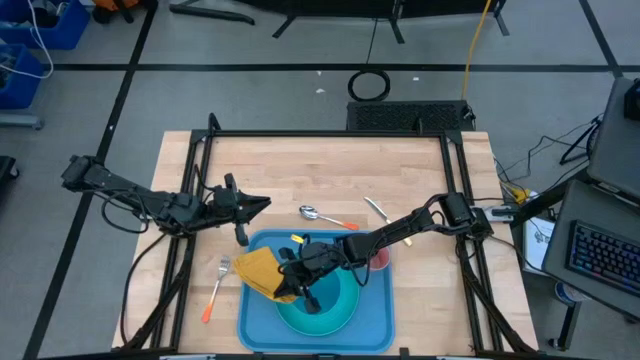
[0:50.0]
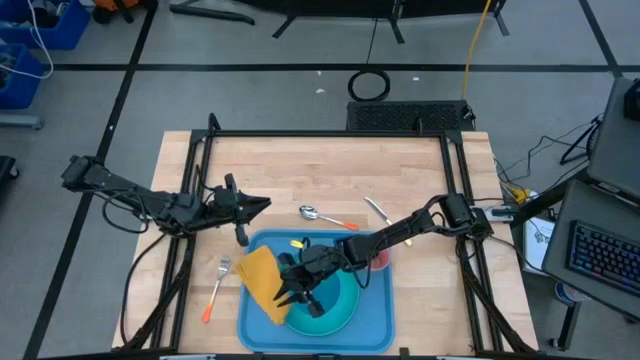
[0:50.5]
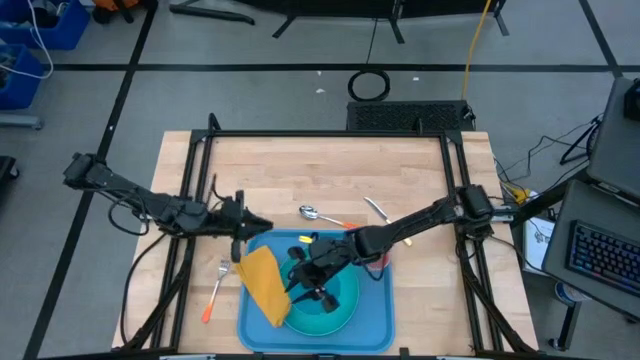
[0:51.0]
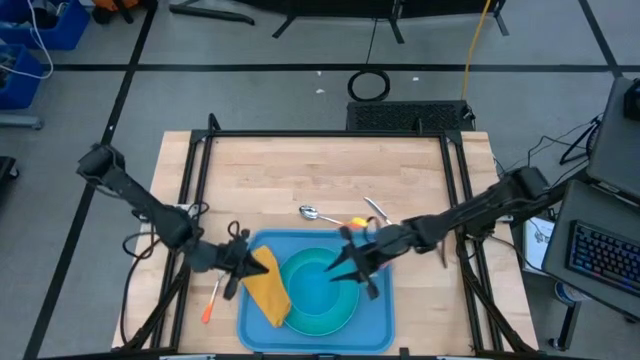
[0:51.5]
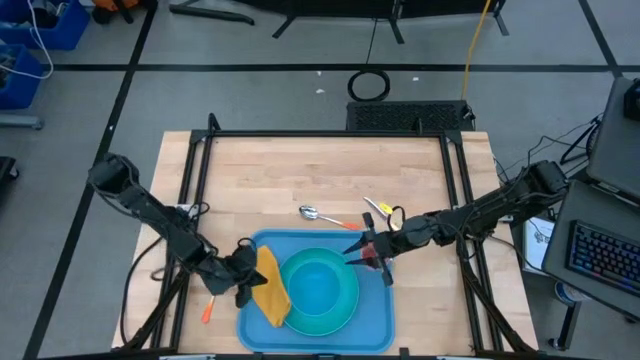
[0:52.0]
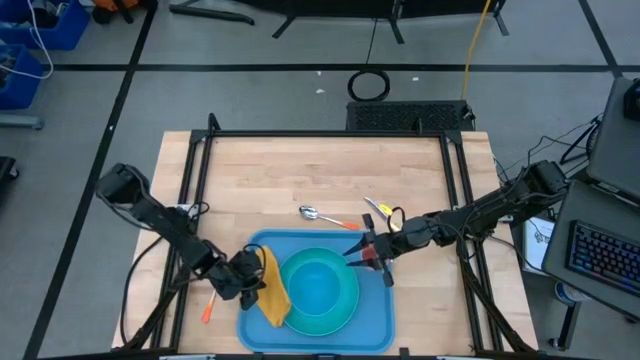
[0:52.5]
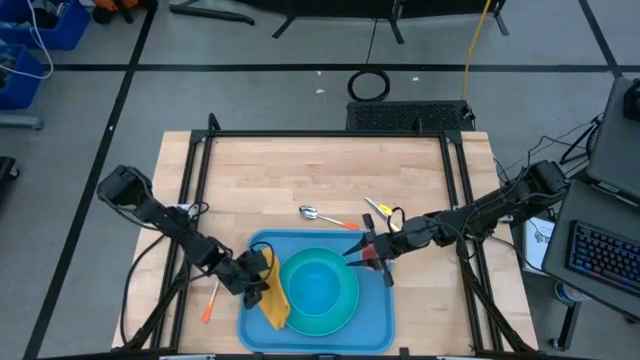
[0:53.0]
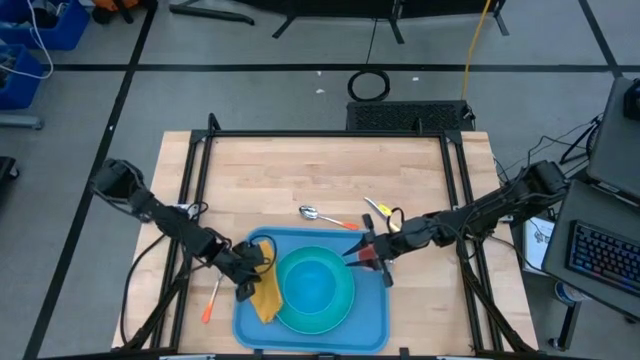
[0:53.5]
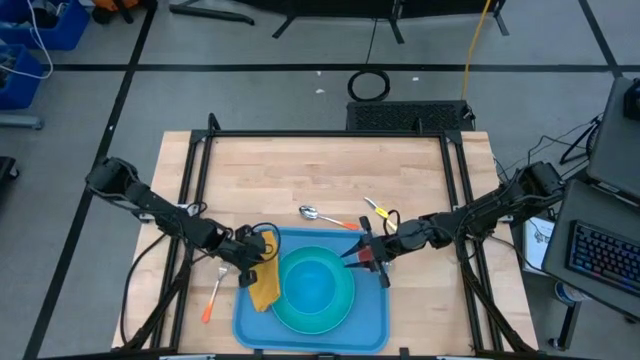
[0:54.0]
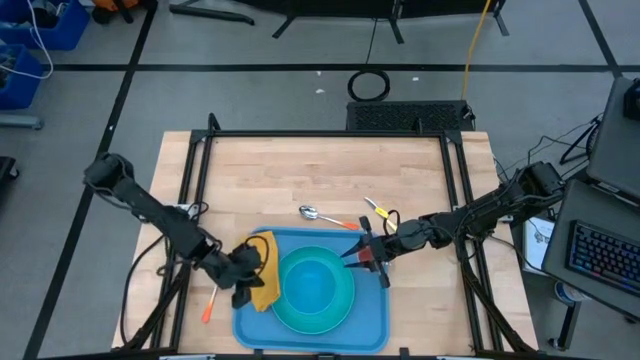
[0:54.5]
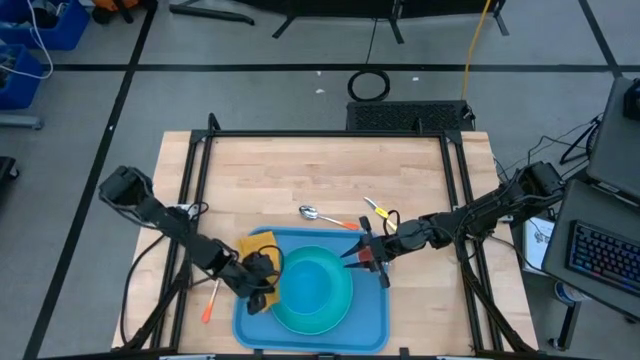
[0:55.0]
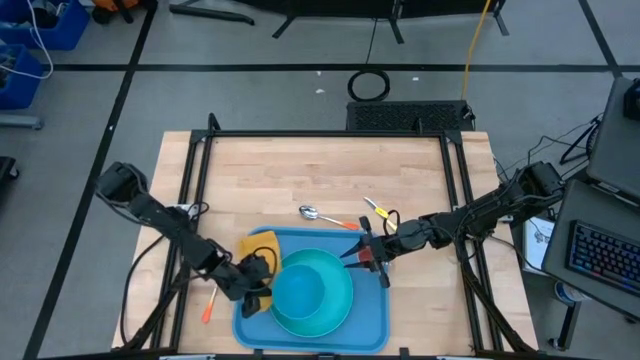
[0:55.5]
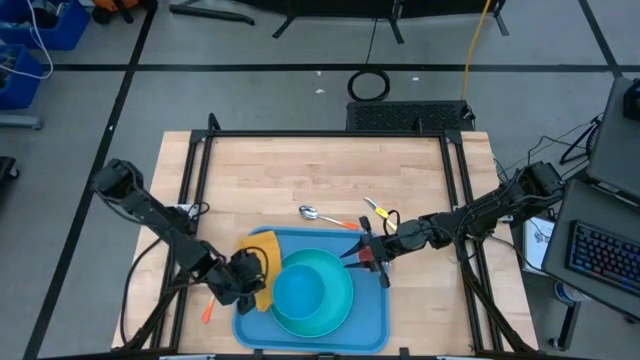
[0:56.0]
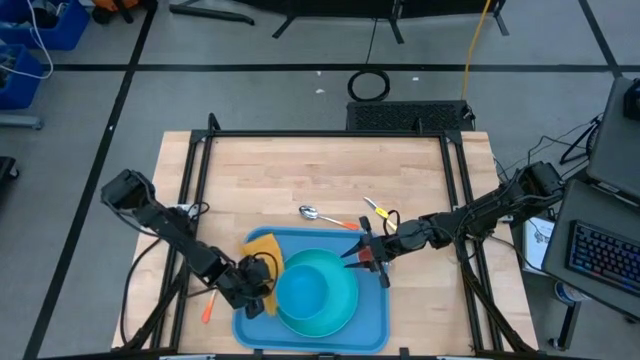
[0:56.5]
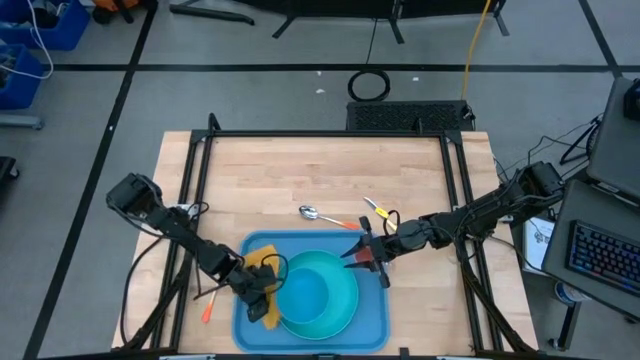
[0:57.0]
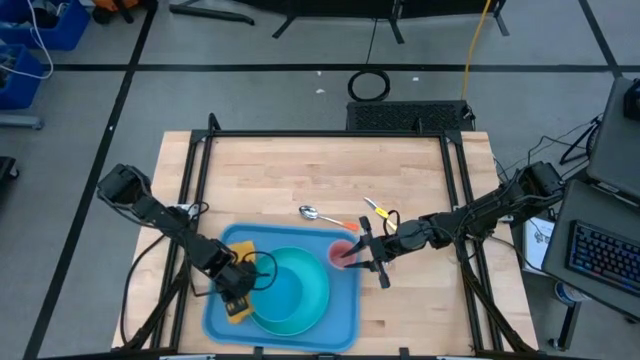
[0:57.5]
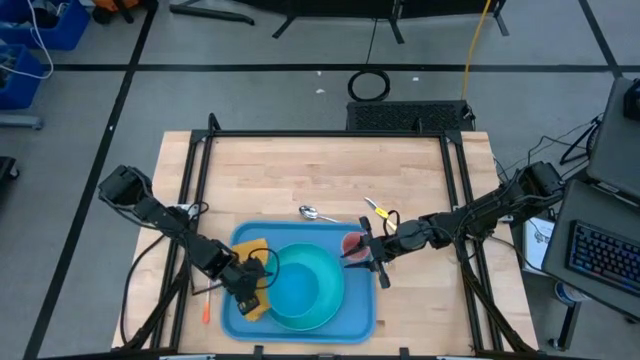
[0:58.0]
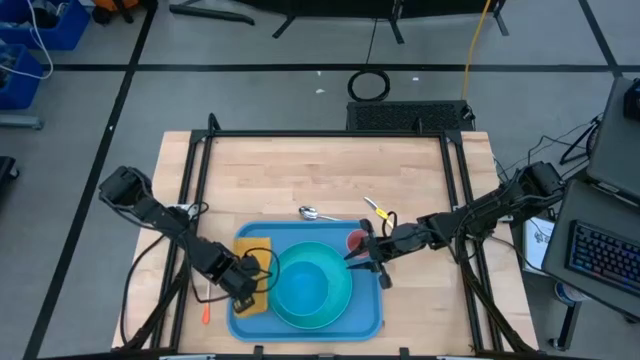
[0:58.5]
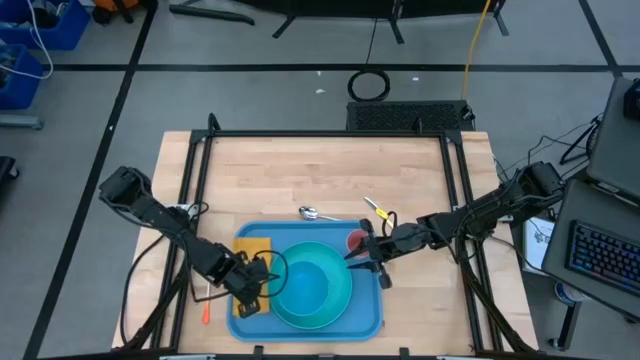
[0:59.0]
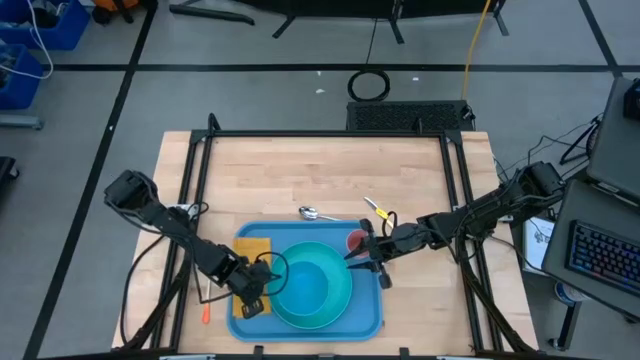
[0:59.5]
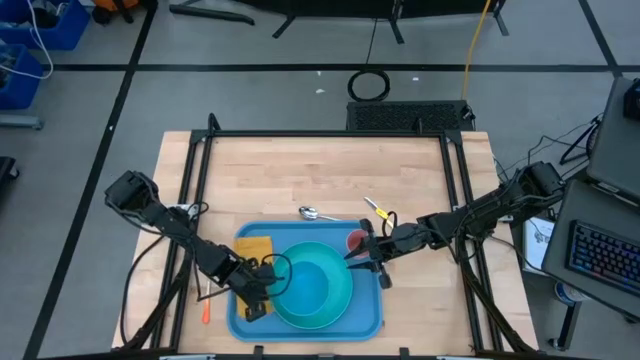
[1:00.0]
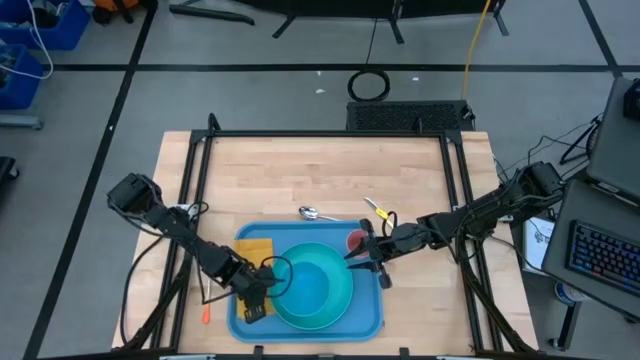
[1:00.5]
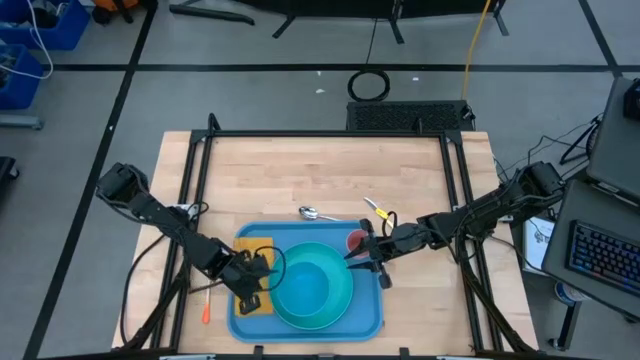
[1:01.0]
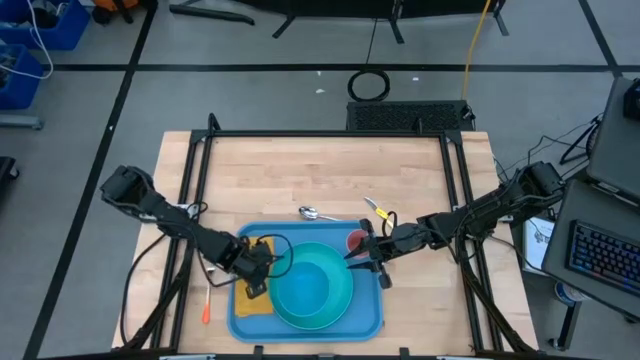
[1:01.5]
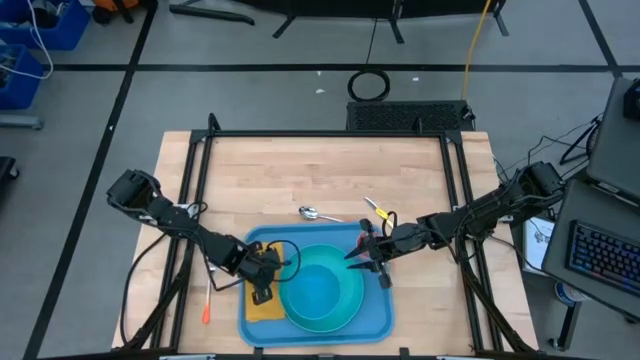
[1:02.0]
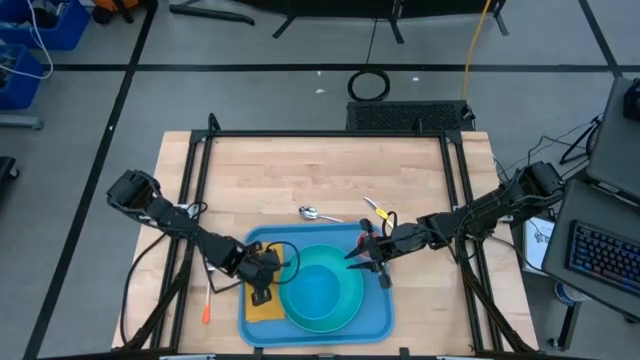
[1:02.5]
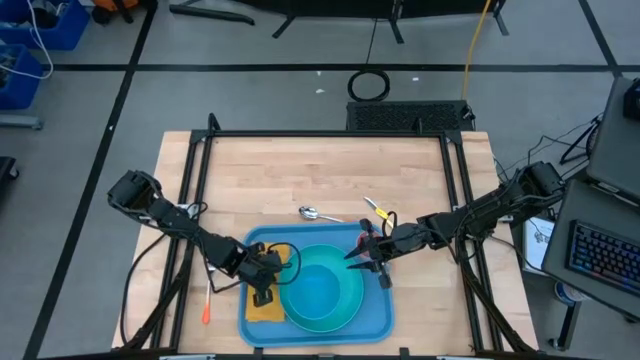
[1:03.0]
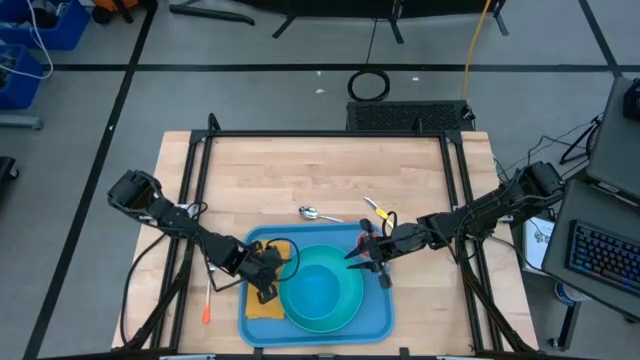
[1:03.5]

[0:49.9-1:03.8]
Task: Set up tray
Put the yellow table napkin on the blue tray to the left of the green plate

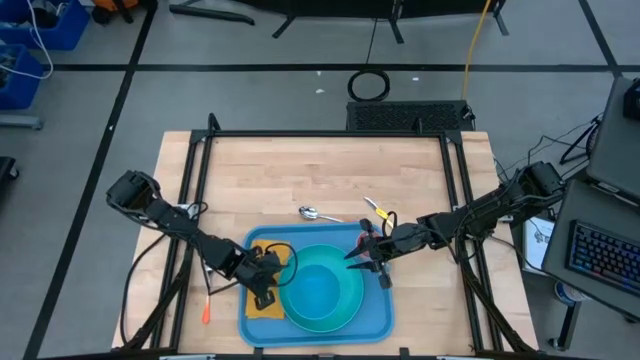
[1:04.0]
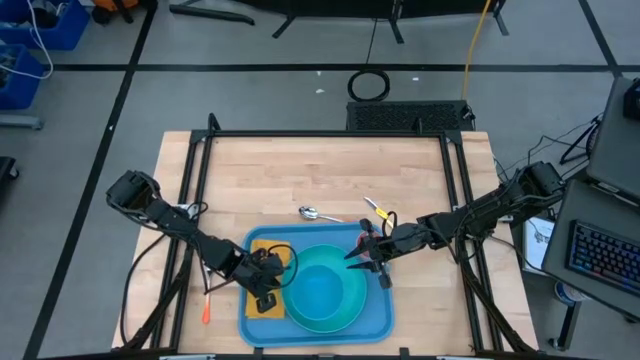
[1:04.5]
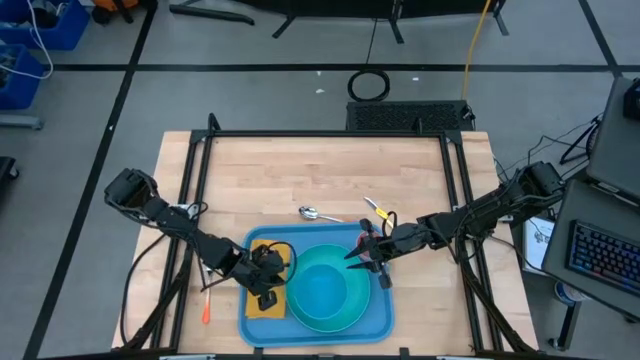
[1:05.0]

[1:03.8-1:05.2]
Adjust the light blue plate on the blue tray

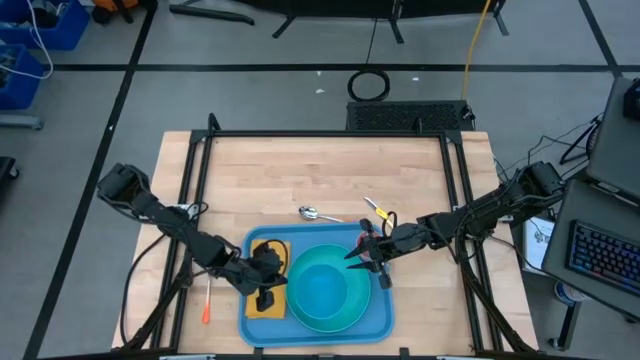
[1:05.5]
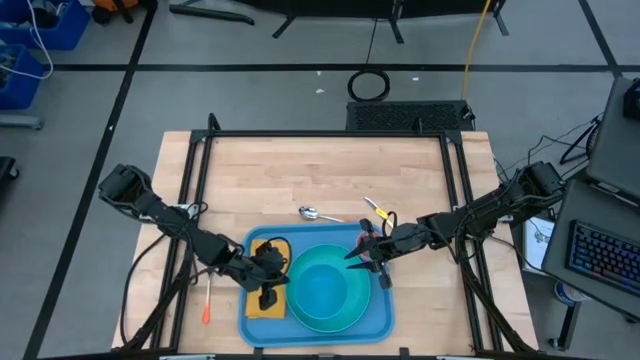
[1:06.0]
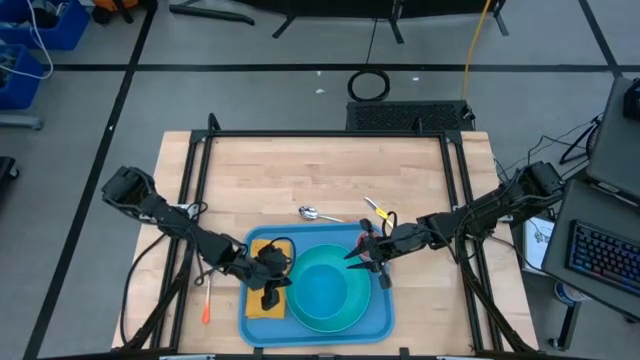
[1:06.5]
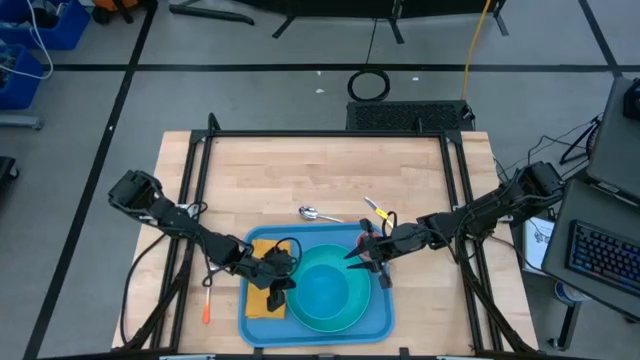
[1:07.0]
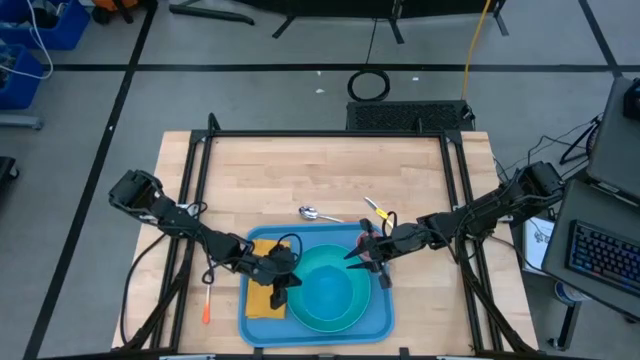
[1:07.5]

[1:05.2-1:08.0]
Adjust the blue bowl on top of the green plate on the blue tray

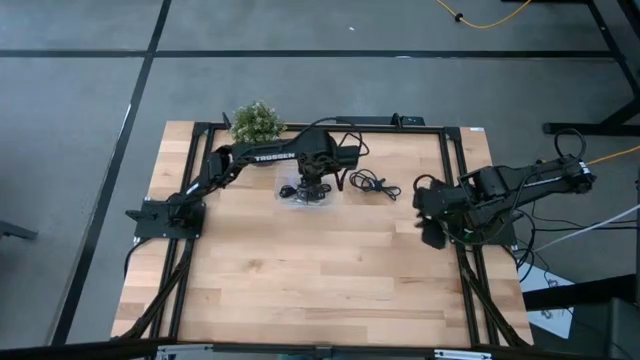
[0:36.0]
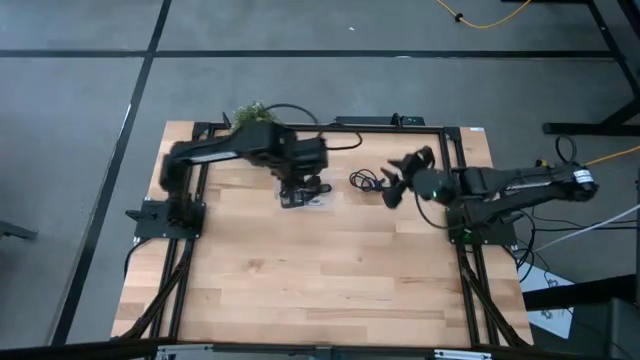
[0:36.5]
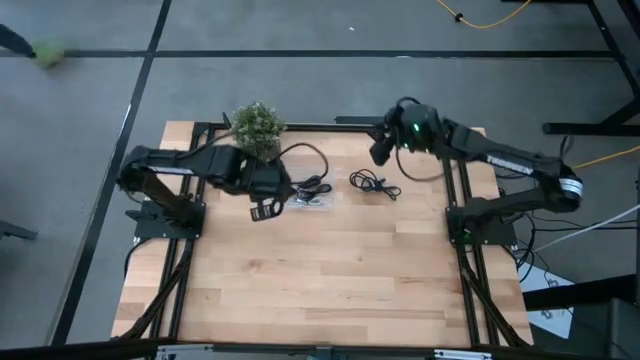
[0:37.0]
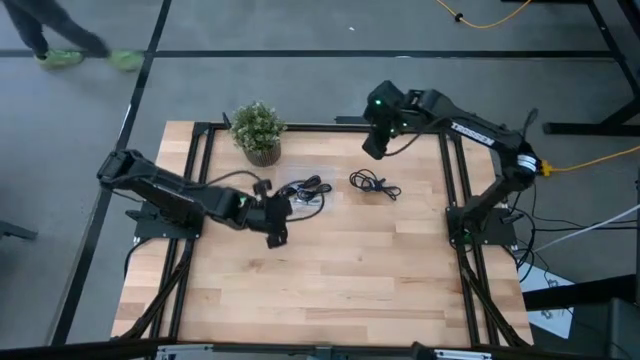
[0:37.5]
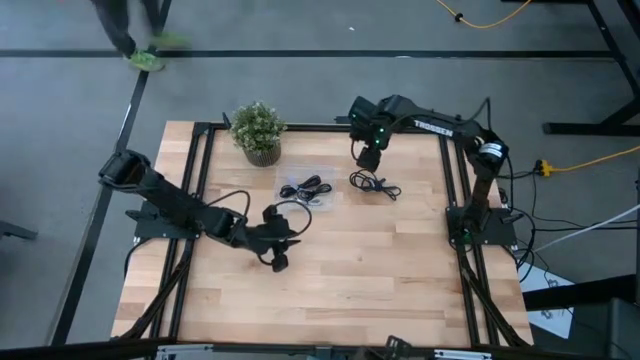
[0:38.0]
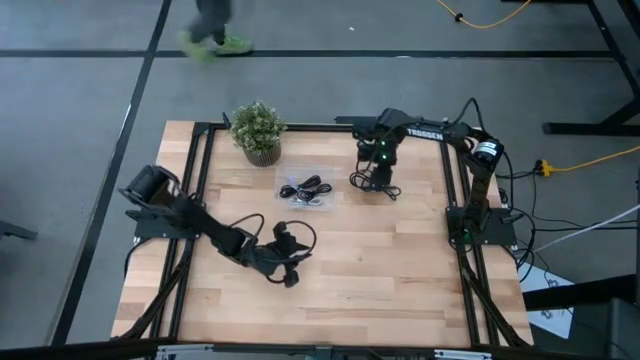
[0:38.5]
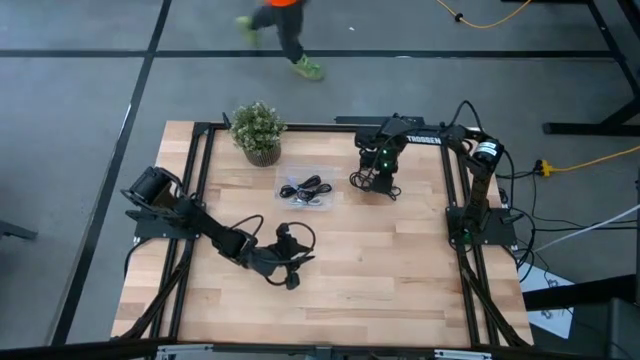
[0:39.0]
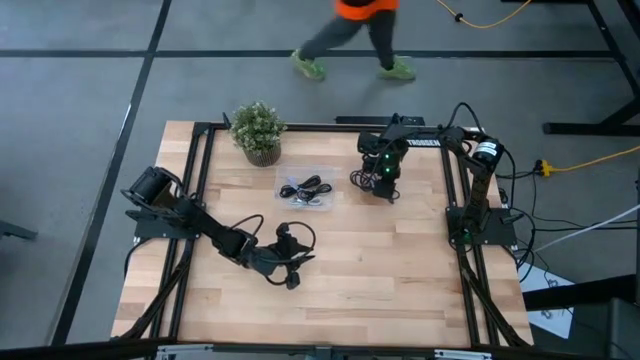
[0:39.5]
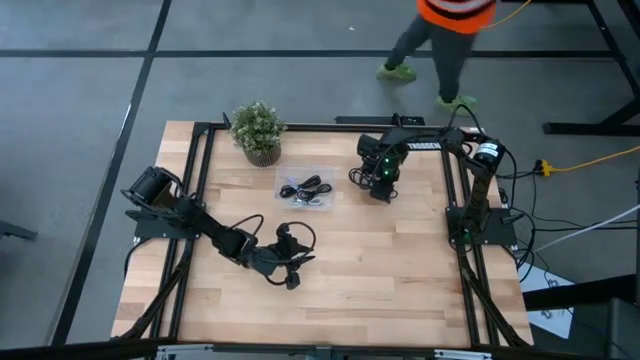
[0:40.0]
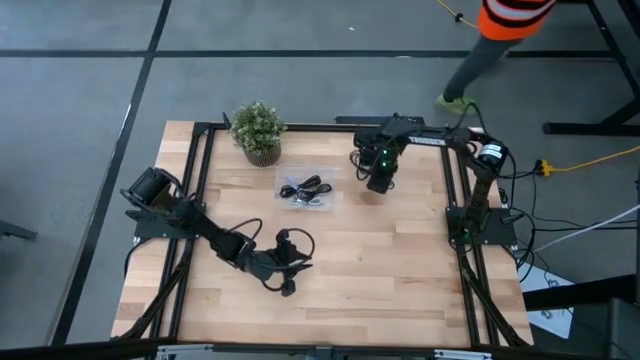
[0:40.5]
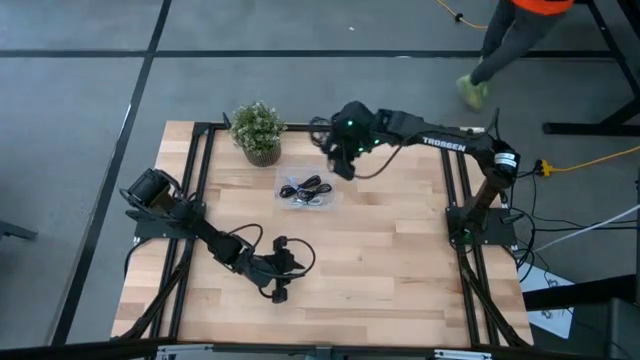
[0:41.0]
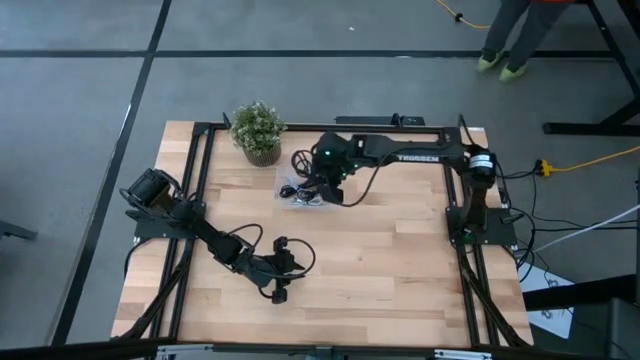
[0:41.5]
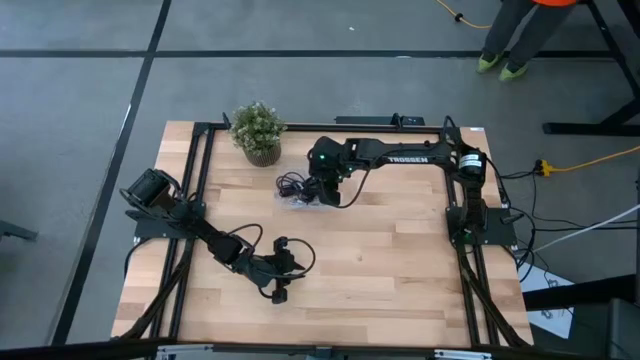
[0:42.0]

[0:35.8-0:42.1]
Task: Pick and place USB-C Cables
Put the black charger cable into the transparent bin
